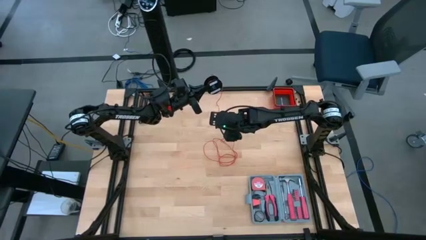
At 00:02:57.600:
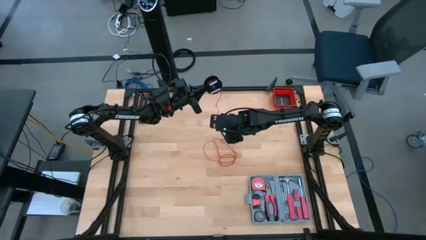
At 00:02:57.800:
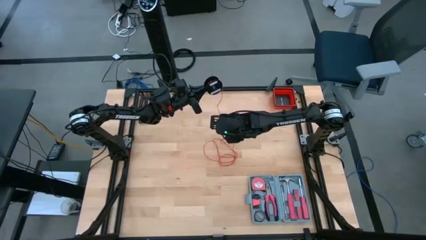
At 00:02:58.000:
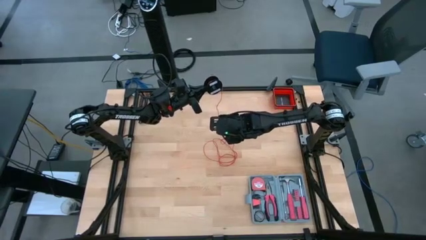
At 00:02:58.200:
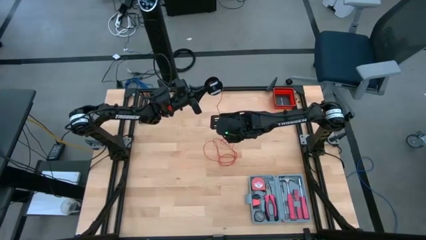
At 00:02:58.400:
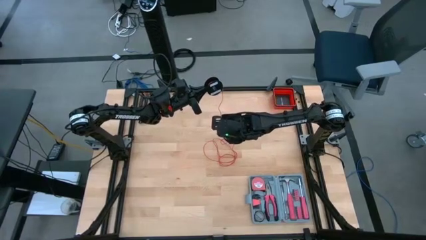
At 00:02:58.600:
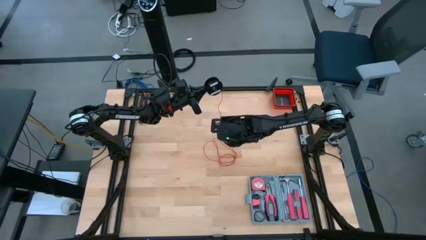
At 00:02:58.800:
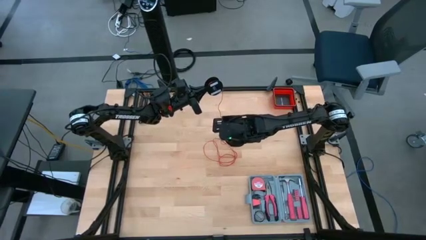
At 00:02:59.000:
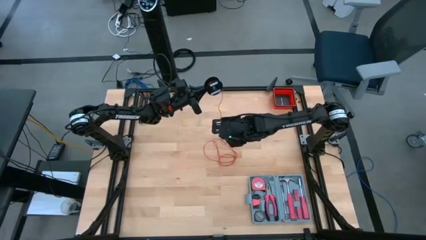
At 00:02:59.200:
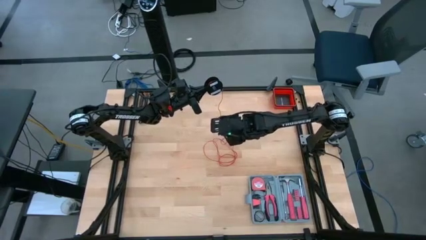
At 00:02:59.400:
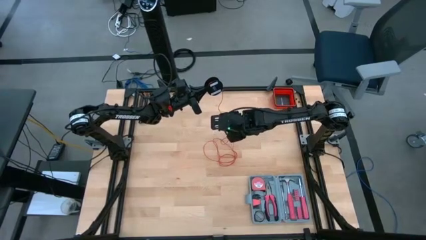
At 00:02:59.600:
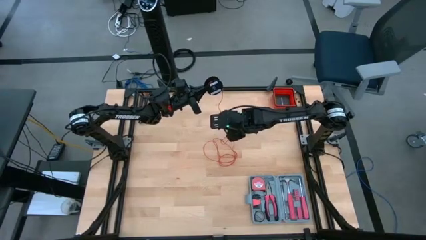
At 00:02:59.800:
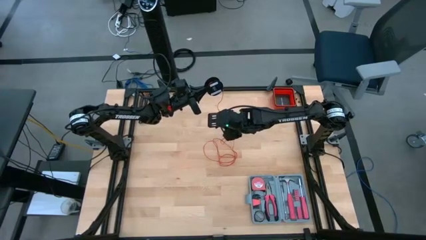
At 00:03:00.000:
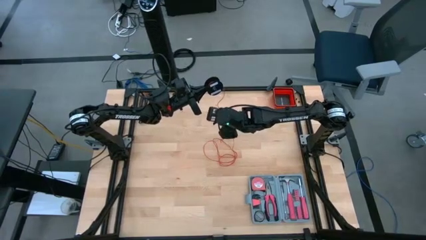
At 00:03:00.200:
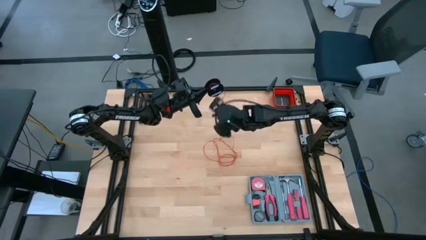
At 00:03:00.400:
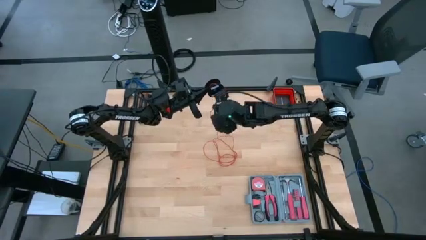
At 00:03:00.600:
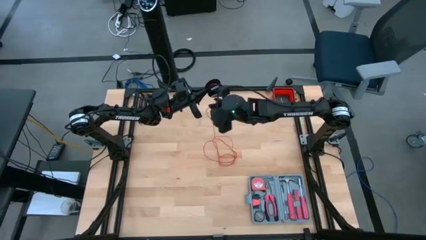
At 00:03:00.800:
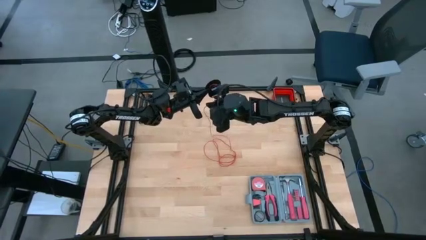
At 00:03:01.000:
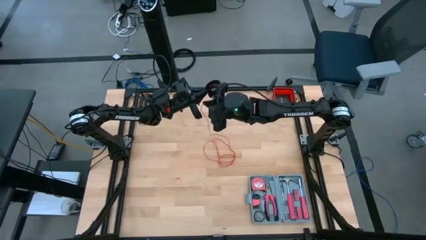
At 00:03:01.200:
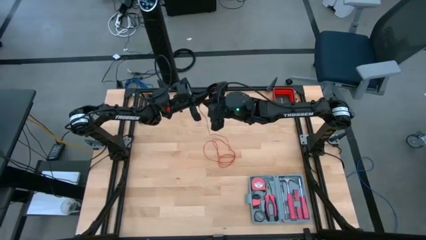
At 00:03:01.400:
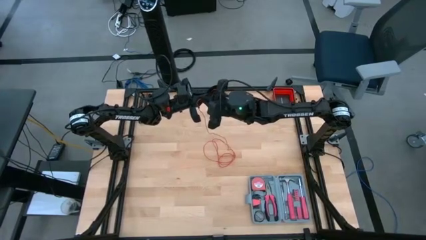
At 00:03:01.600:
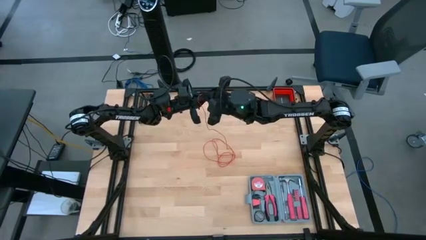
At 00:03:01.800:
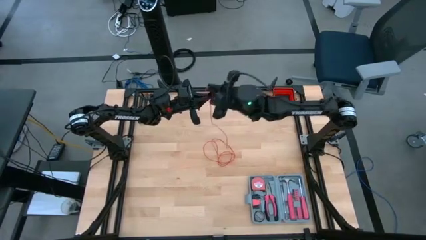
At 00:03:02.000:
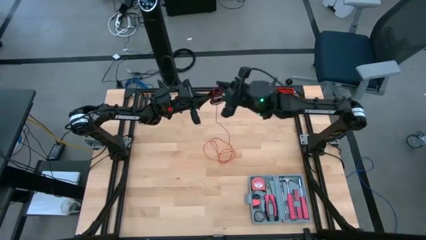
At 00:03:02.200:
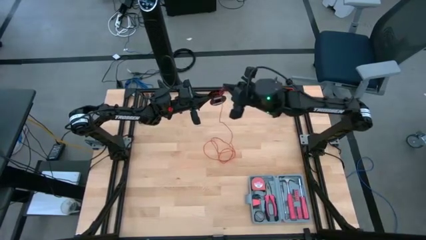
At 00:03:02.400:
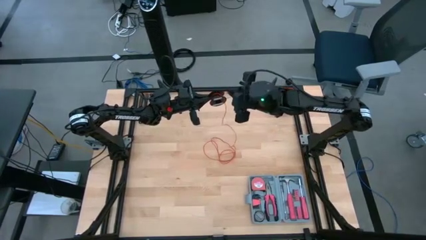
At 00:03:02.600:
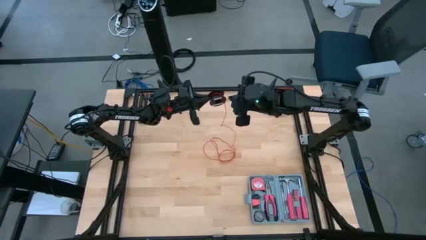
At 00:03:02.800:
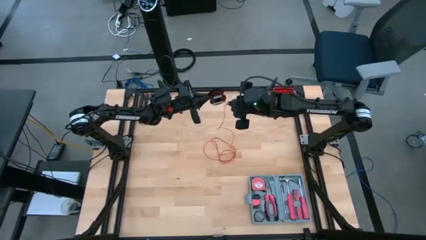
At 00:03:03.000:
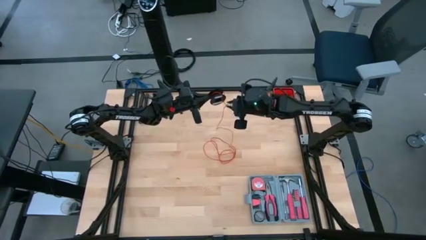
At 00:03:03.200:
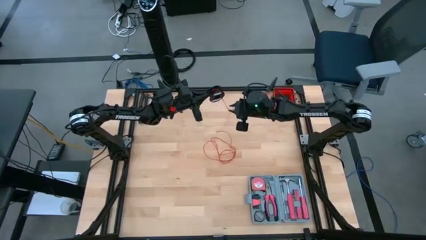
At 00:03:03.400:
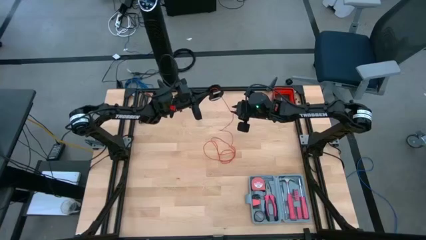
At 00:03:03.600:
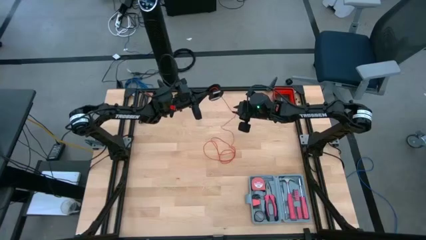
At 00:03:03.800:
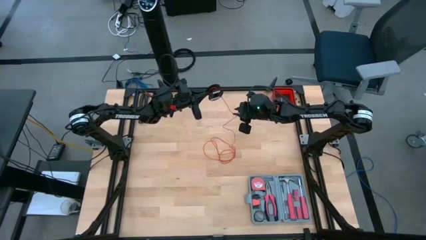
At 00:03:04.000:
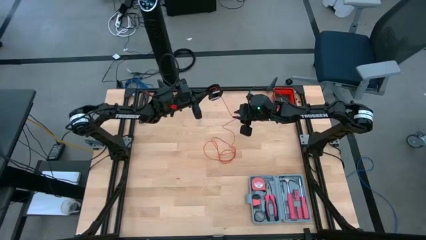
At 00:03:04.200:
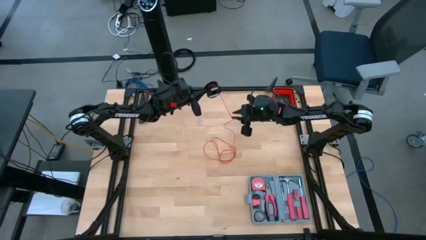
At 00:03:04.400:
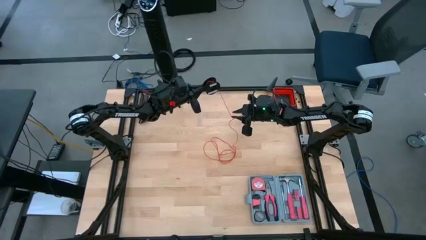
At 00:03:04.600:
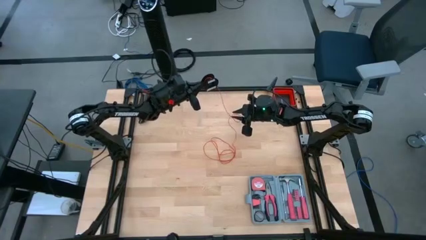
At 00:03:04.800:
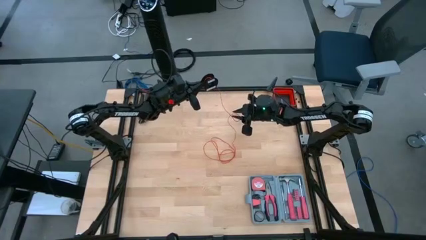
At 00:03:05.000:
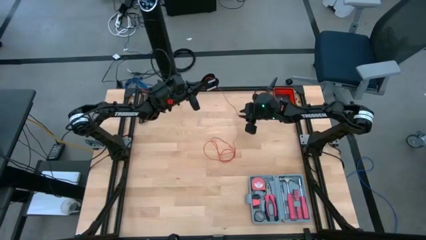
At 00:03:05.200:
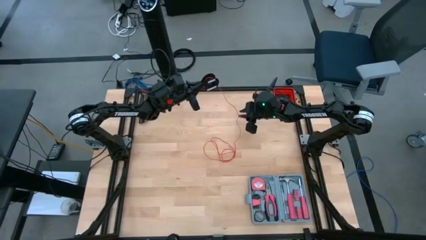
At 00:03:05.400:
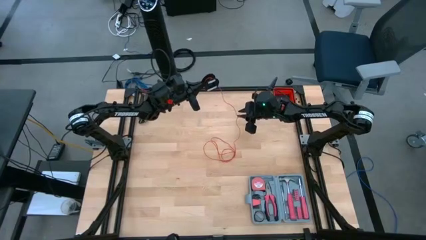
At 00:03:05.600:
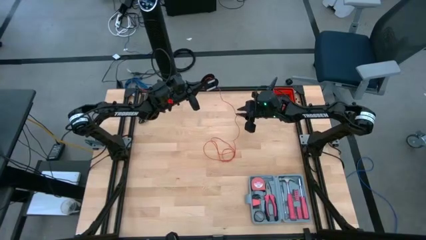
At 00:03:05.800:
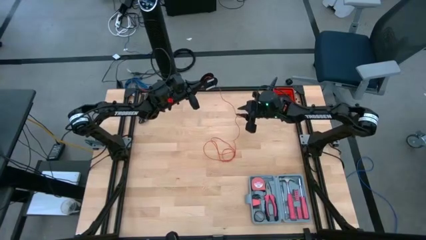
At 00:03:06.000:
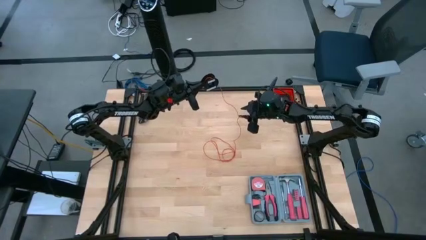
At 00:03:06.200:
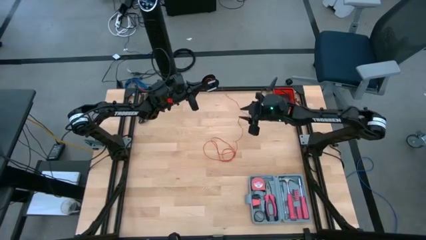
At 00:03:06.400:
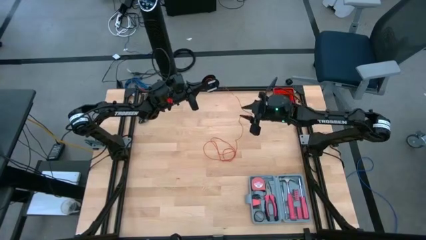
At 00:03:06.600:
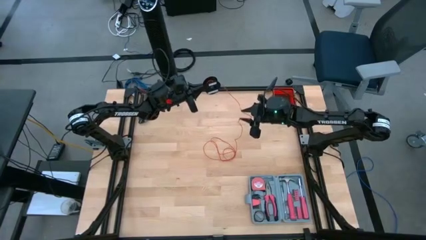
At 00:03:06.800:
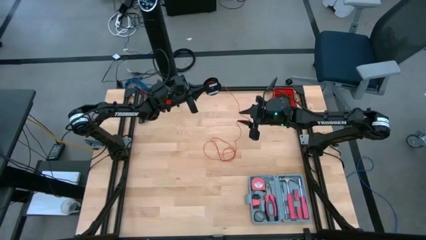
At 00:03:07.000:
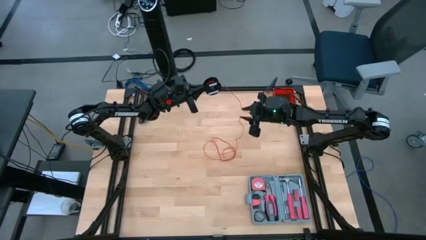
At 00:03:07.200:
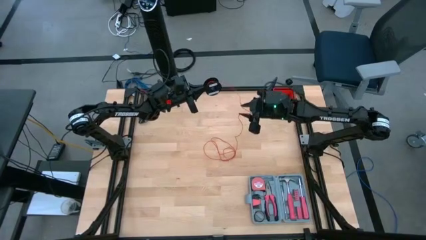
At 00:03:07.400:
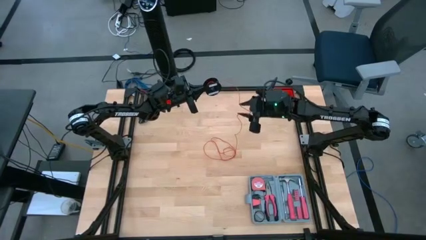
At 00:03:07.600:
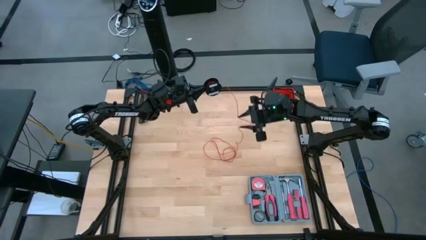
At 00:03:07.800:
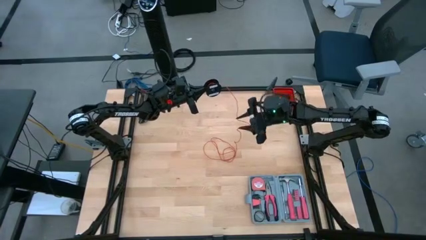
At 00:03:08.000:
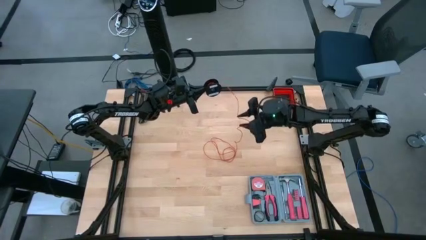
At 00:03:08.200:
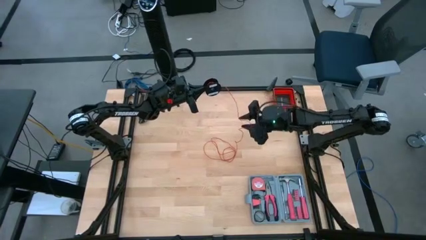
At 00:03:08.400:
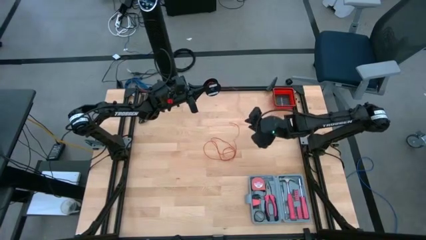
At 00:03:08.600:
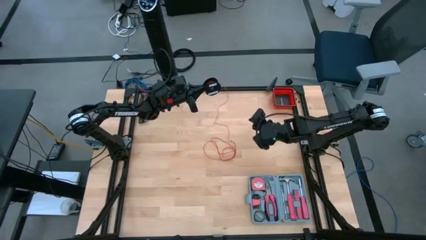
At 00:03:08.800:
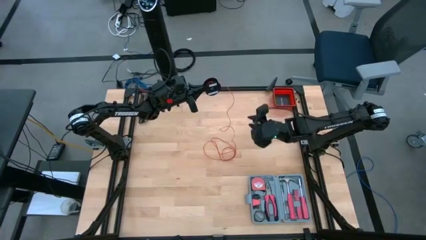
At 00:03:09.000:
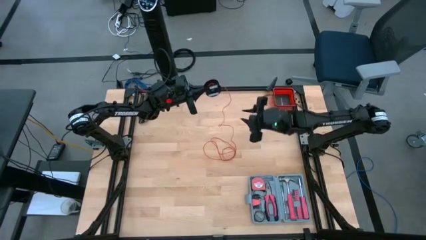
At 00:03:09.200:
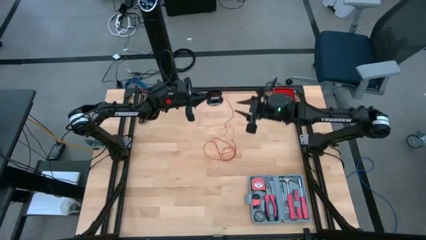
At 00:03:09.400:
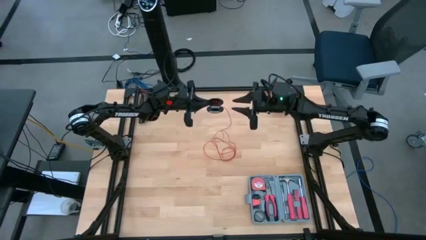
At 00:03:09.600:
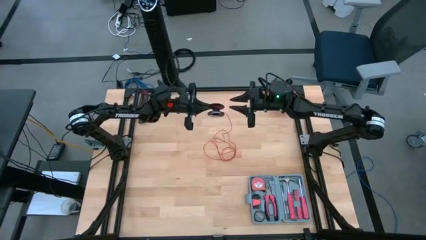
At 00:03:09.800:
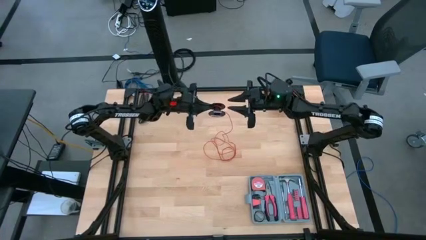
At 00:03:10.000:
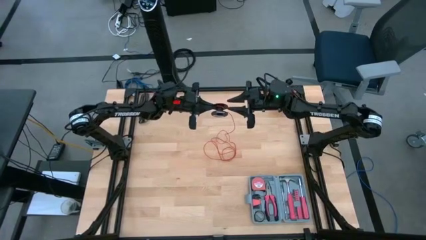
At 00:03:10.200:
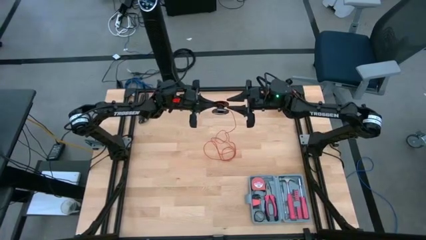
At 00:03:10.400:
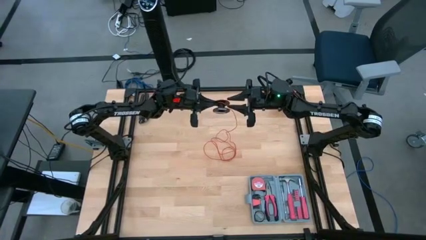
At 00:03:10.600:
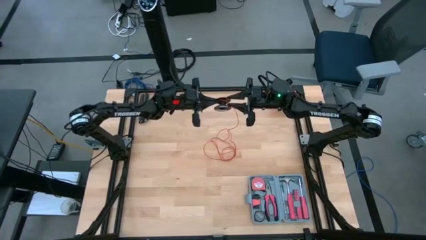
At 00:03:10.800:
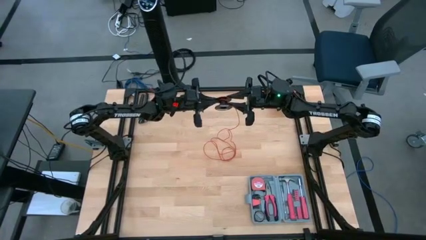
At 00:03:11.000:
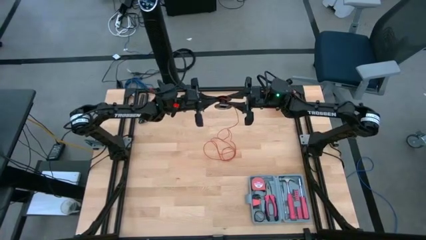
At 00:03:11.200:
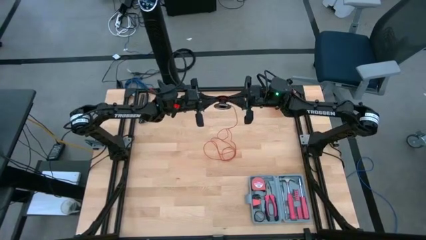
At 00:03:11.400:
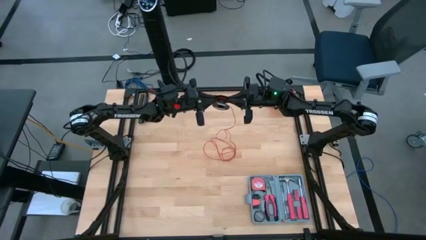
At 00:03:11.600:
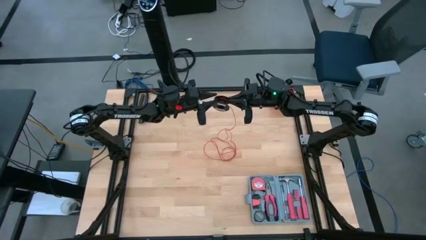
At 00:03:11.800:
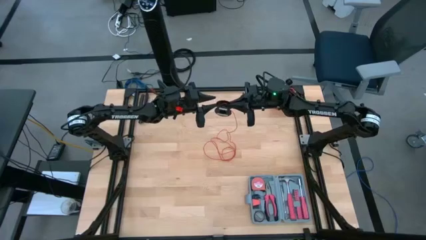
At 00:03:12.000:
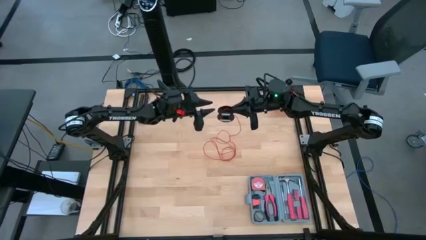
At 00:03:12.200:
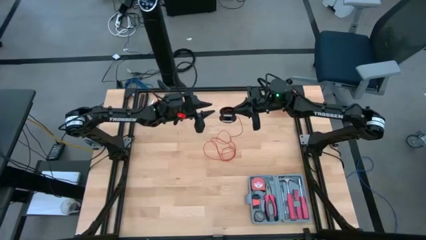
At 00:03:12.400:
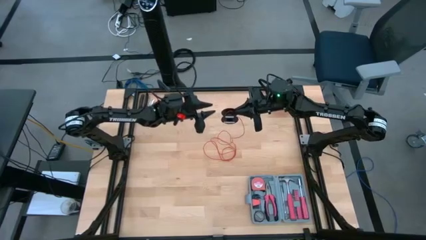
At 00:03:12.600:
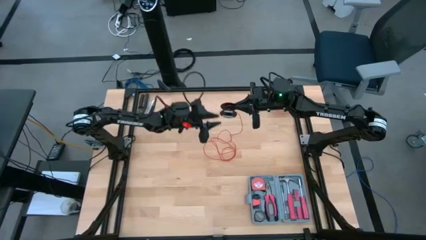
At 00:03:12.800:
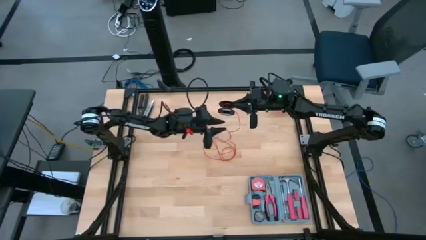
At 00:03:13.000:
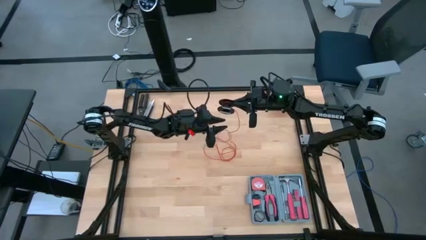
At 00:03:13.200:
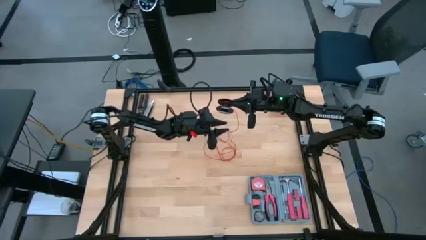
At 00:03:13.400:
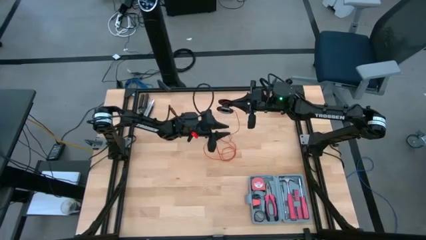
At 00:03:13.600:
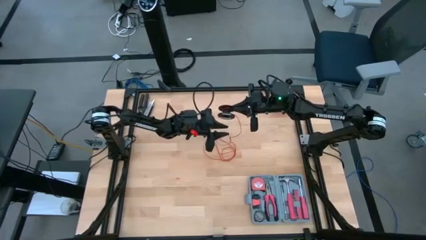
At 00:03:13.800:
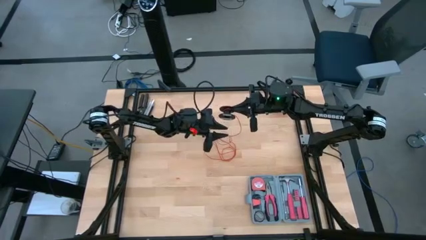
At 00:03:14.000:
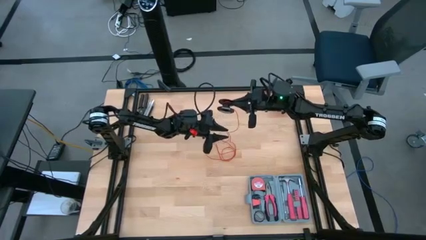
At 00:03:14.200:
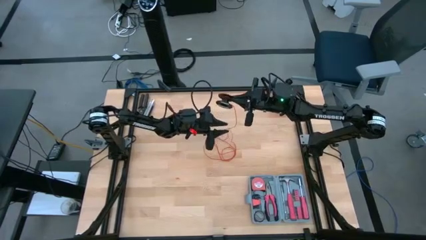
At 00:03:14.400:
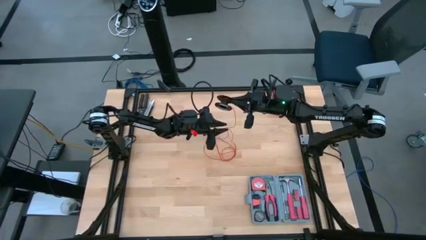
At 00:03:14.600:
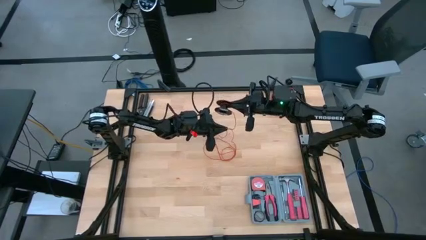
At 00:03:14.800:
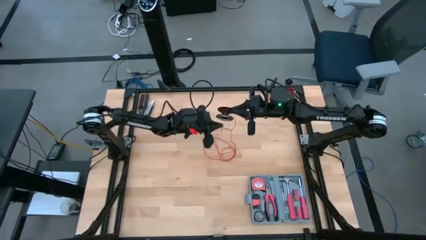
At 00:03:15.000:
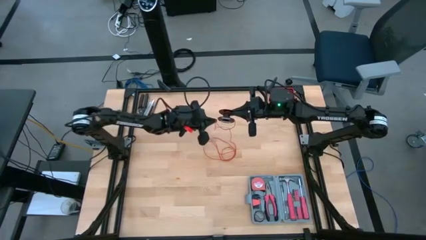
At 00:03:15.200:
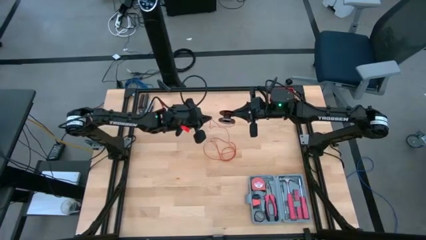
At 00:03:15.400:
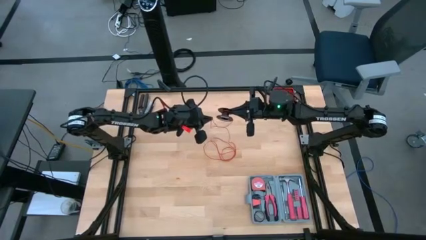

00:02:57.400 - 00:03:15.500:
Task: Coil cords
Coil the wire
